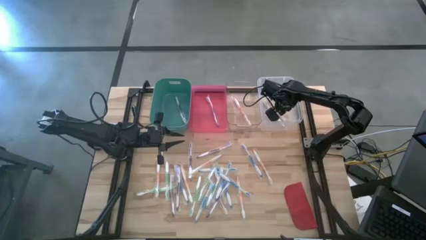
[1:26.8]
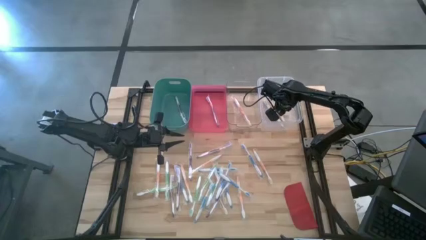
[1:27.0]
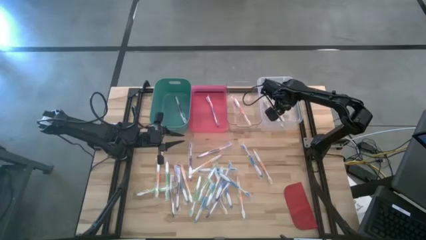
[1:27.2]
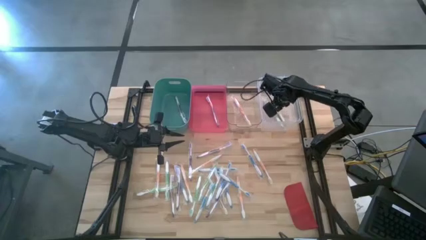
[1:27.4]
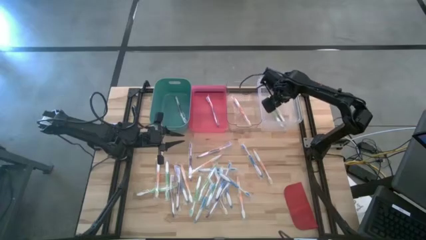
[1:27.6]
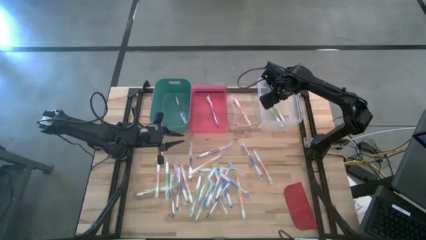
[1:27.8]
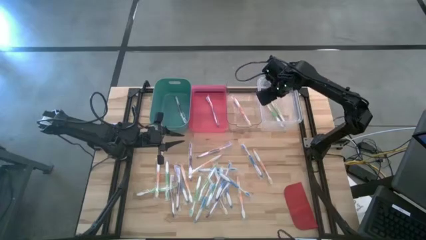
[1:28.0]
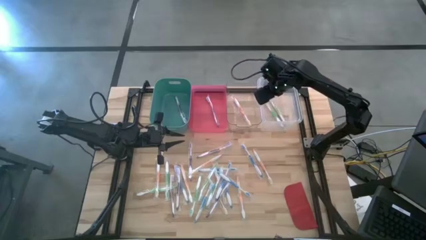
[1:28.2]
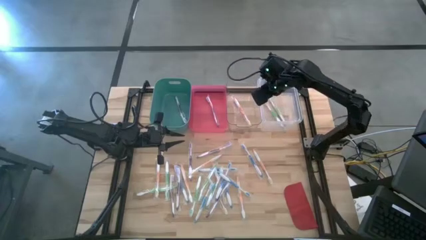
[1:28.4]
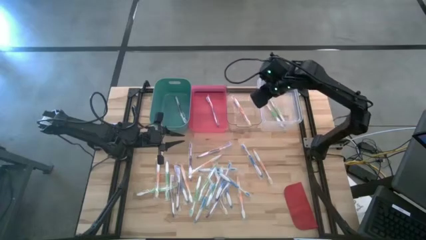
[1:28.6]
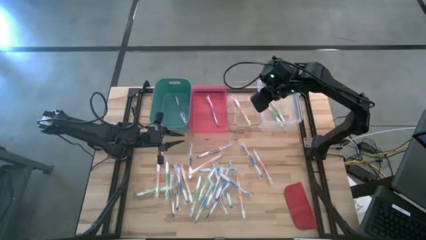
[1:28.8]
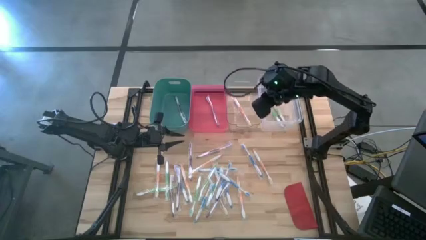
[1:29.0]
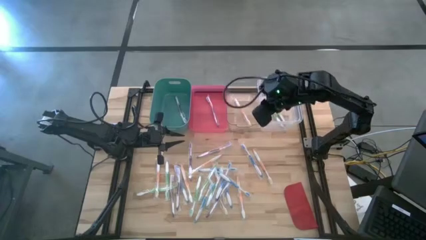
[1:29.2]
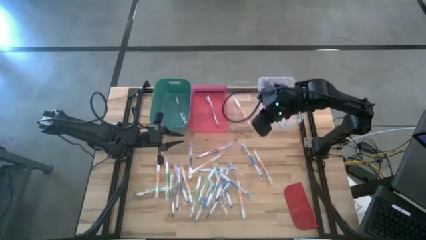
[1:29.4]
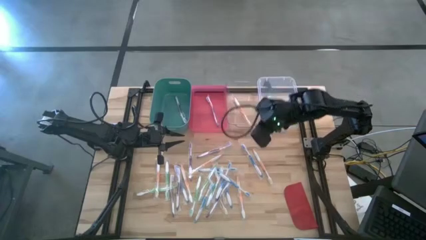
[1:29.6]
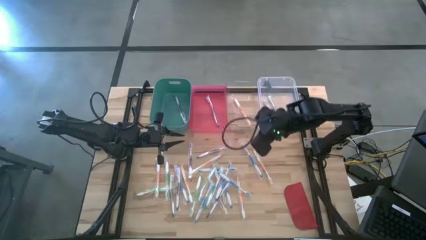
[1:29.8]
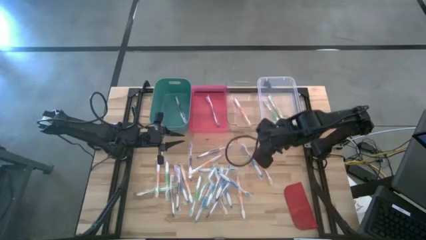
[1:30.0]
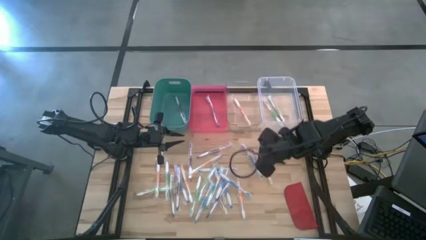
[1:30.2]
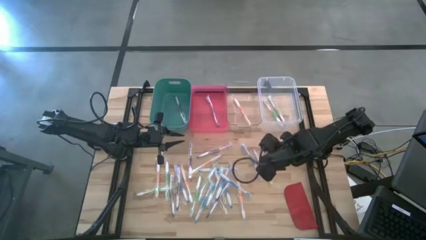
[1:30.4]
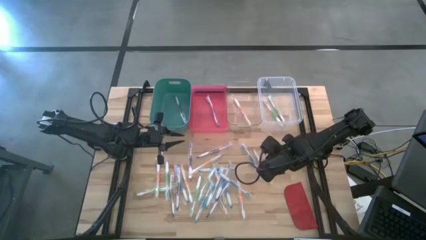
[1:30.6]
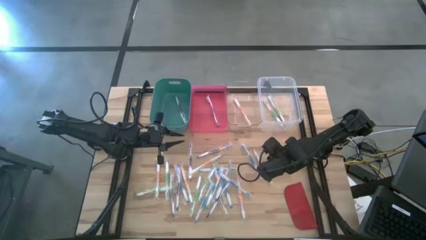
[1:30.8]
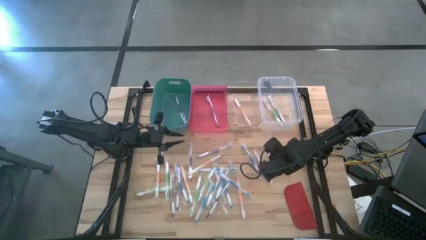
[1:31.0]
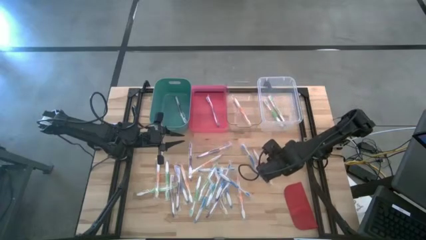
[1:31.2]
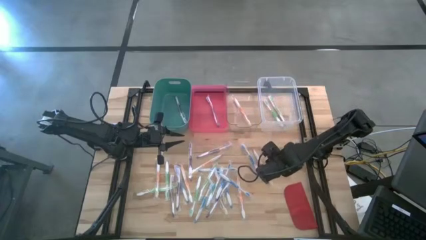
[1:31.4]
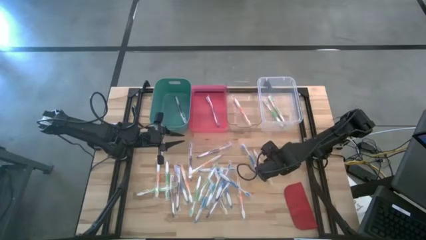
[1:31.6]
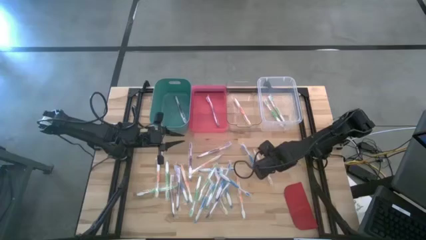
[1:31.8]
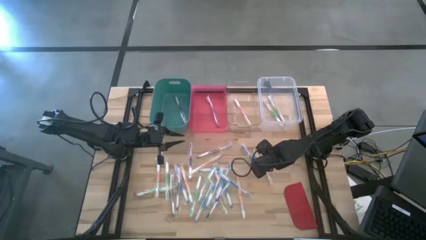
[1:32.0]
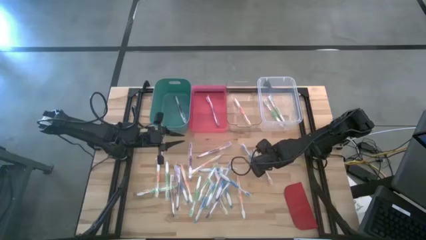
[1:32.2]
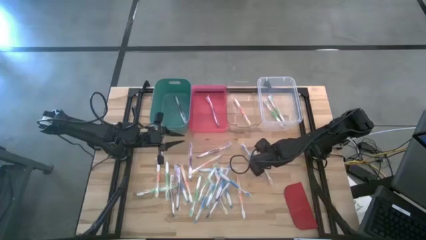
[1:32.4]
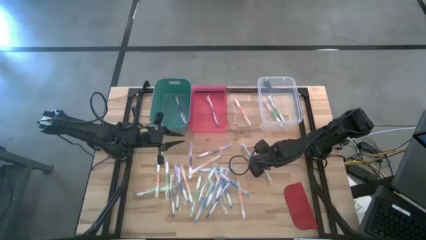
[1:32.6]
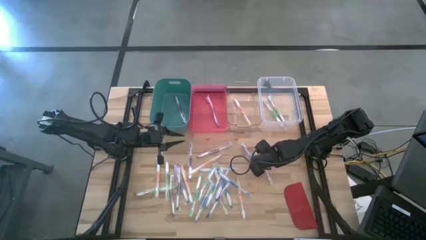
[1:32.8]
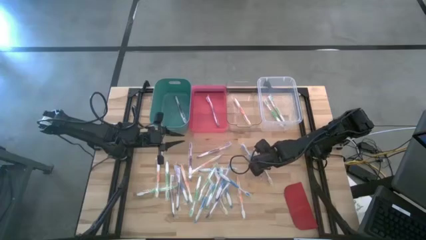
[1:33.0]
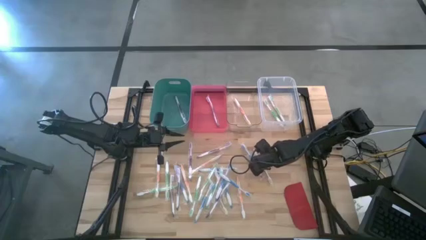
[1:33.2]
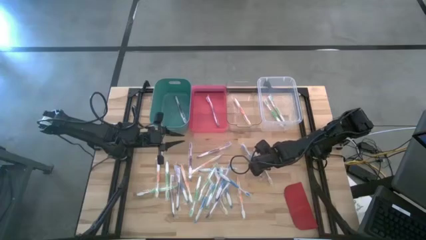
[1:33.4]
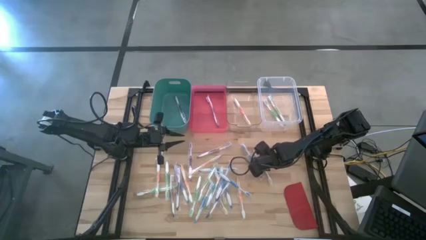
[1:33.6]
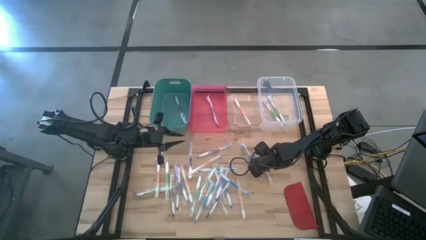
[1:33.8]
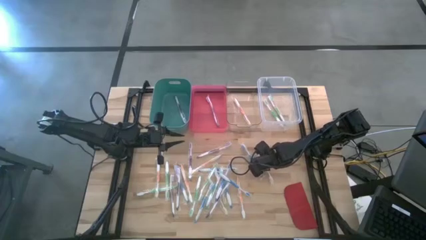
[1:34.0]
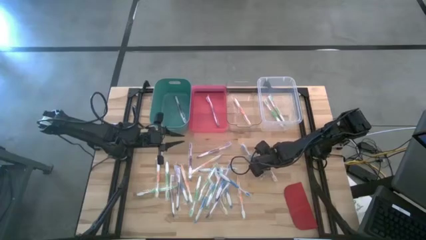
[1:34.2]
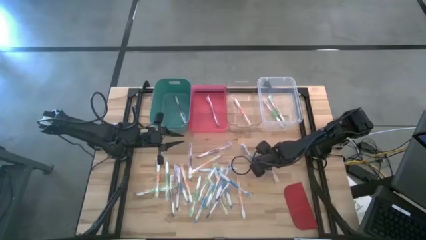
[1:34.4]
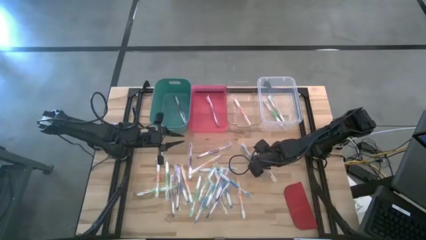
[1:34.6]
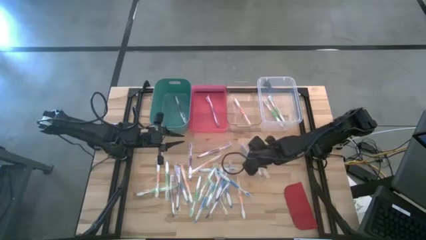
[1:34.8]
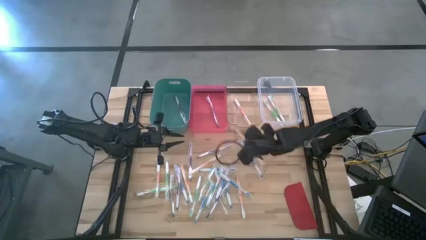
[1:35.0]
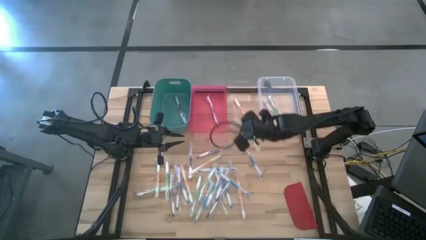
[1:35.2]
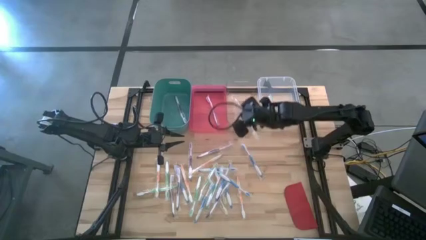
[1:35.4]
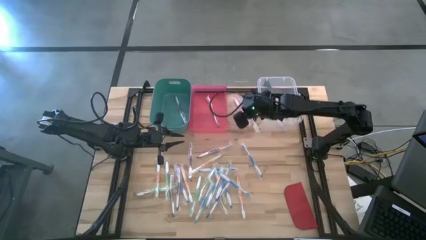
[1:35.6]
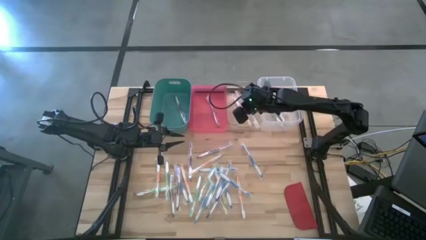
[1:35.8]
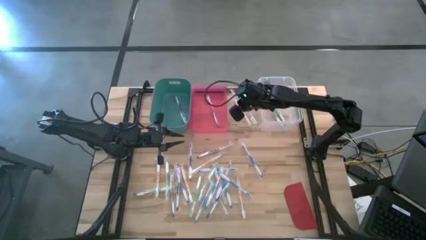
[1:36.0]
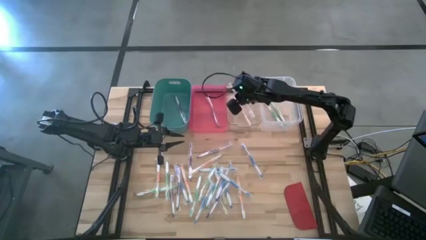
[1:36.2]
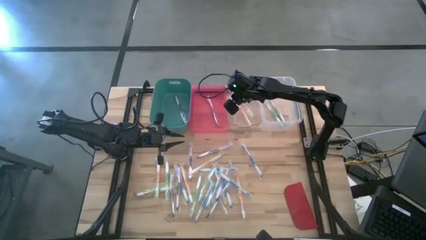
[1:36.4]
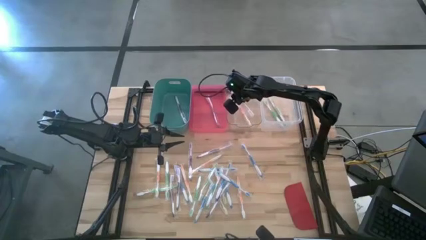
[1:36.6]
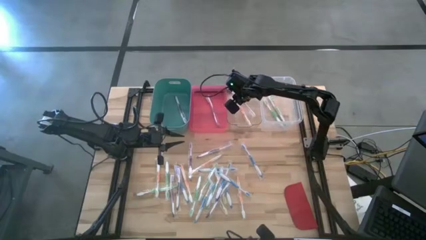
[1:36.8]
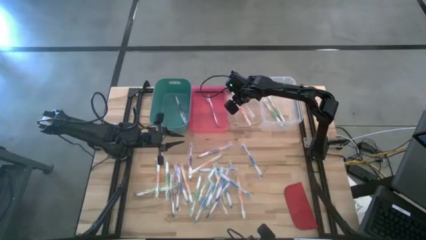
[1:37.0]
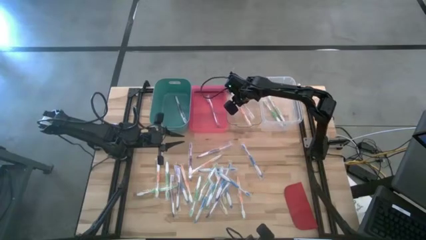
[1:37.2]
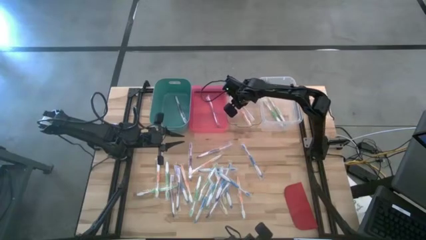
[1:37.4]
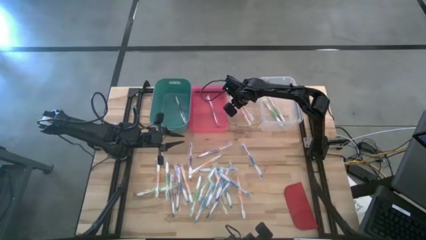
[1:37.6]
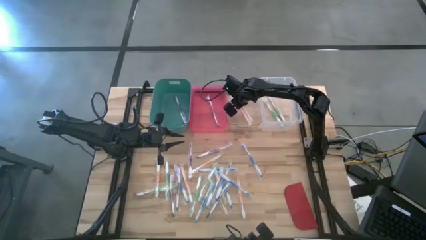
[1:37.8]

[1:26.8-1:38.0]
Task: Pick & Place Toothbrushes
Put the orange toothbrush into the transparent bin

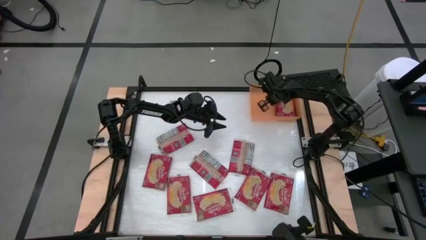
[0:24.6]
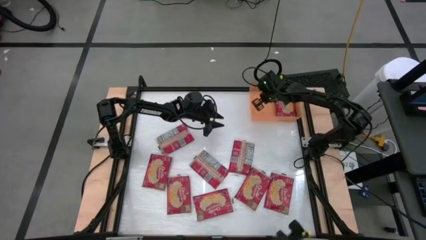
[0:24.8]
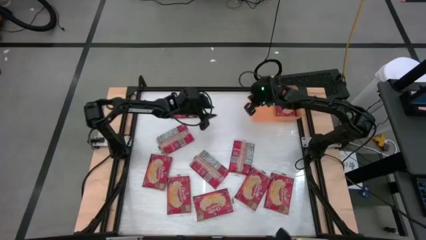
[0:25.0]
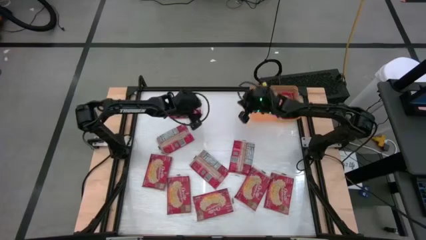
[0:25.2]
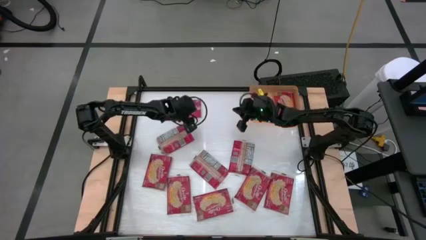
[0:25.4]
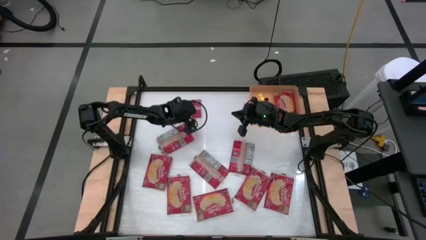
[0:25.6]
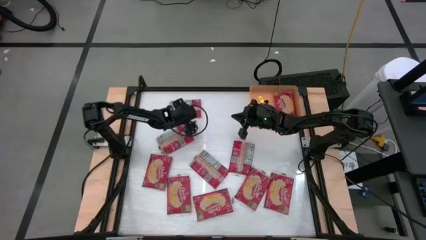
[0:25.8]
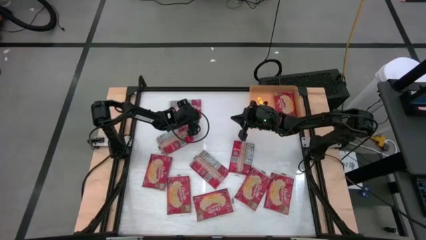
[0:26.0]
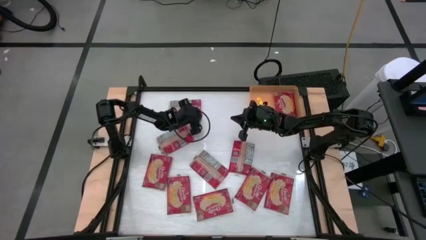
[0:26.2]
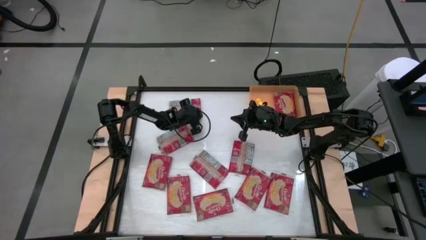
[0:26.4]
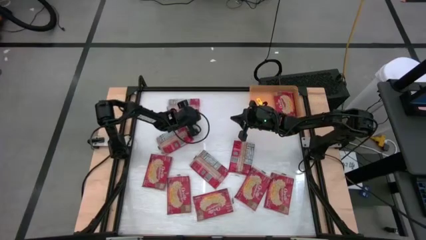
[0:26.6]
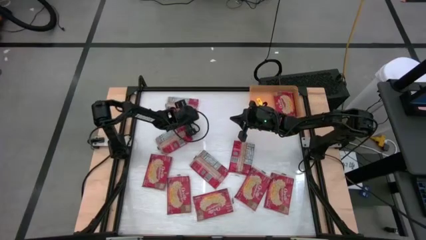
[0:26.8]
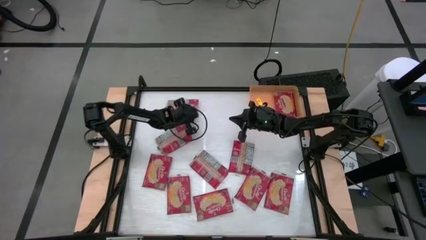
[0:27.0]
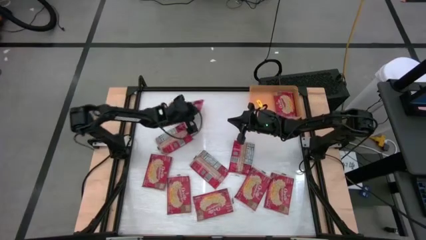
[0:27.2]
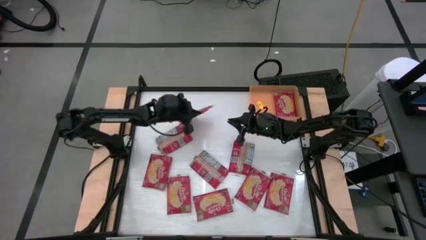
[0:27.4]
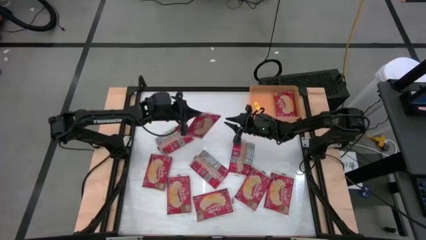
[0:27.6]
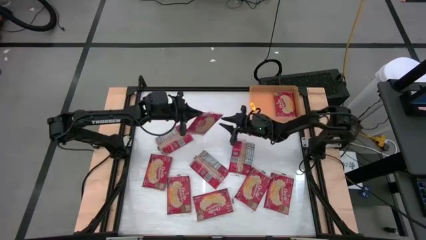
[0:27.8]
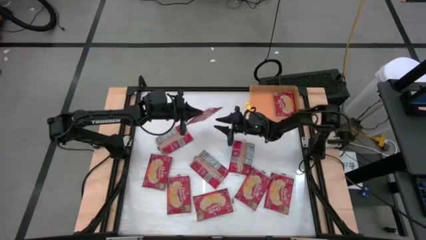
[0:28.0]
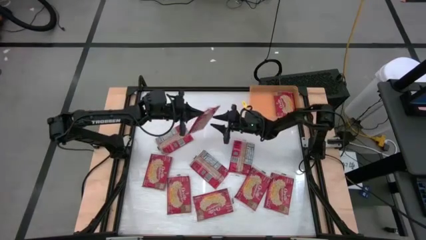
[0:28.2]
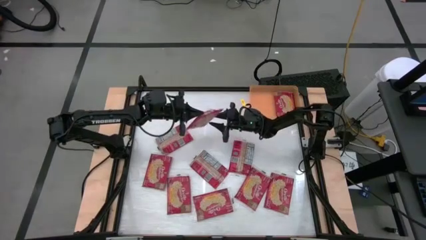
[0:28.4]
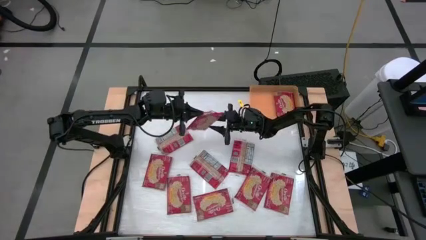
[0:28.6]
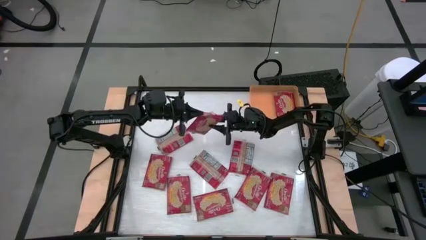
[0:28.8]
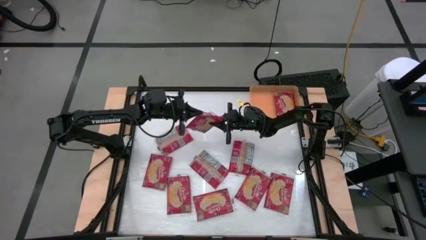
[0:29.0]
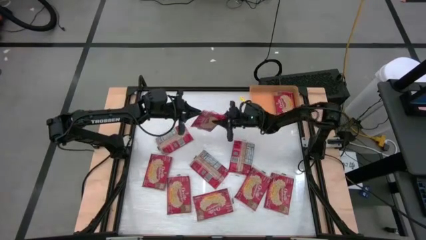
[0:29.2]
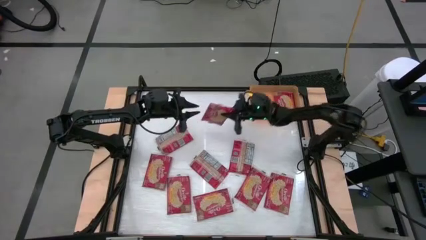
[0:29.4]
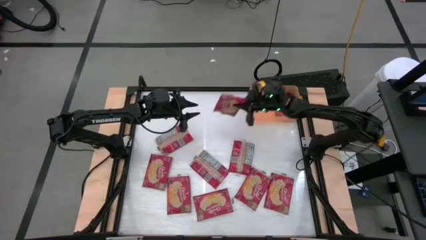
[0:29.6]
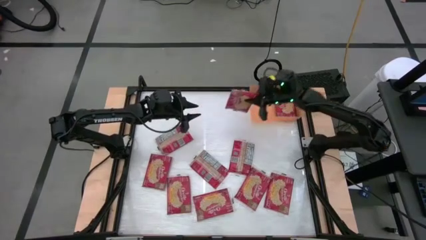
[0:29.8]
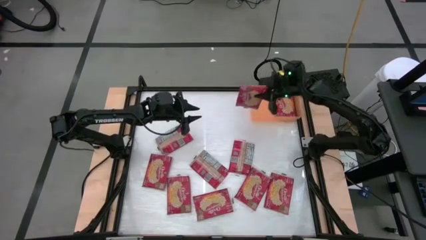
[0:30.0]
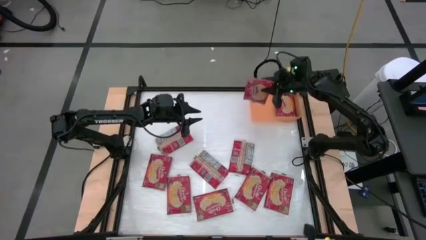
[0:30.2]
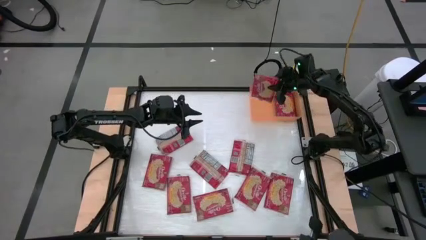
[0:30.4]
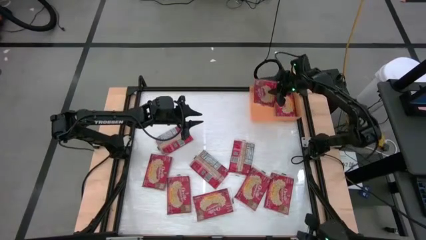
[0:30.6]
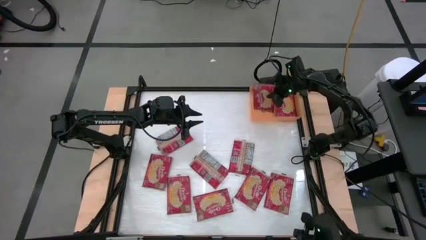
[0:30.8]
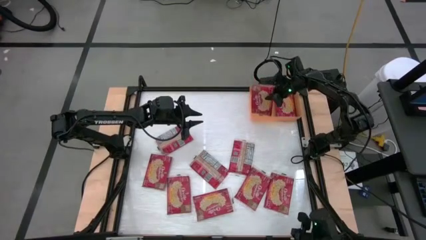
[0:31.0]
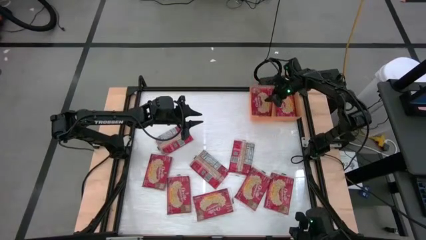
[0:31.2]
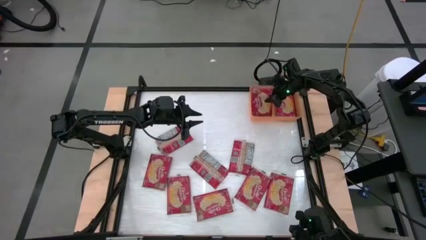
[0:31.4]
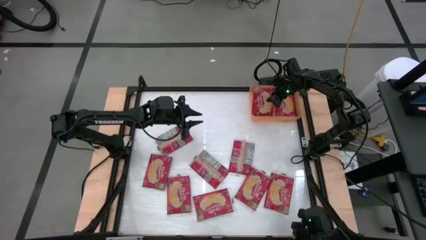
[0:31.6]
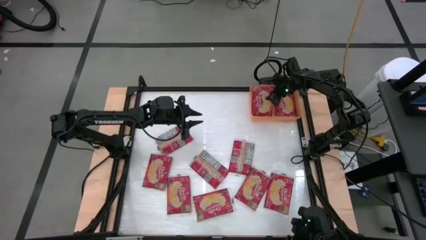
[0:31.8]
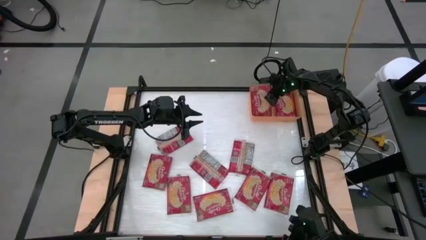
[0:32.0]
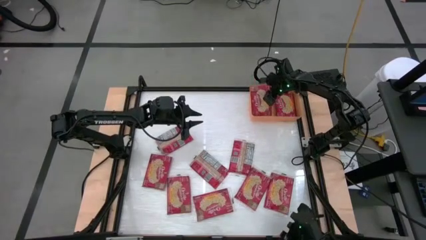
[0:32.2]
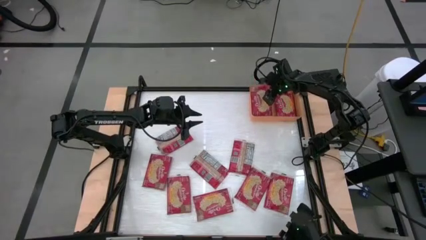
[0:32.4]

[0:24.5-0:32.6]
Task: Sort popcorn bags into baskets
Put the red popcorn bag into the orange bin
